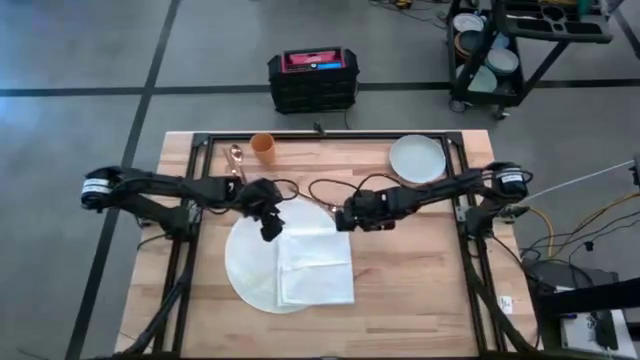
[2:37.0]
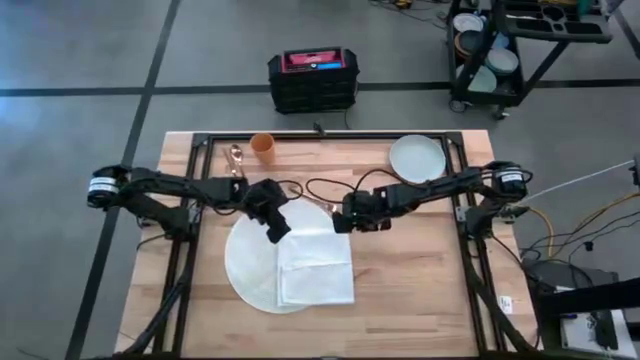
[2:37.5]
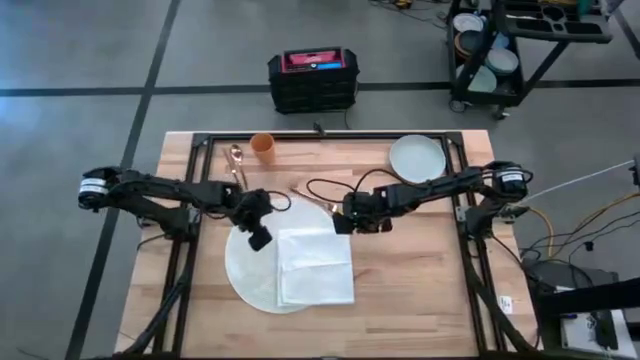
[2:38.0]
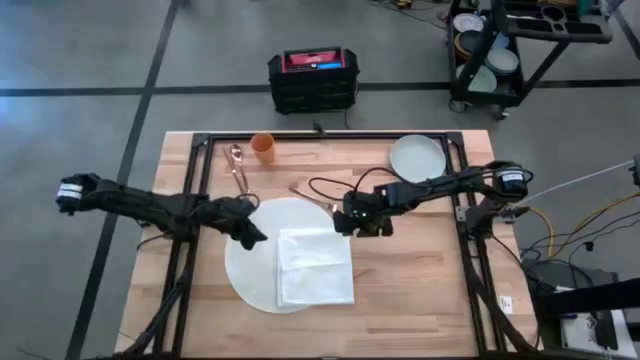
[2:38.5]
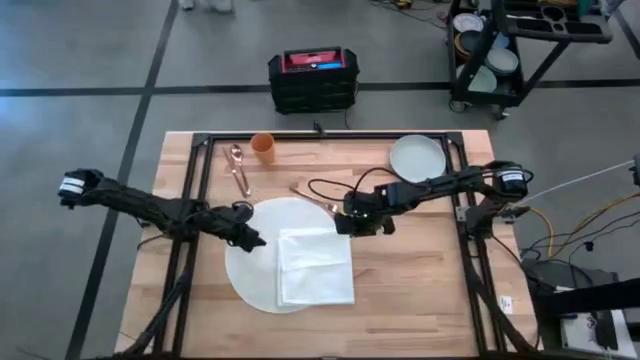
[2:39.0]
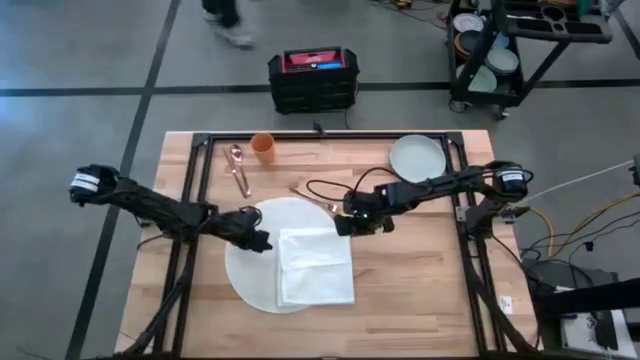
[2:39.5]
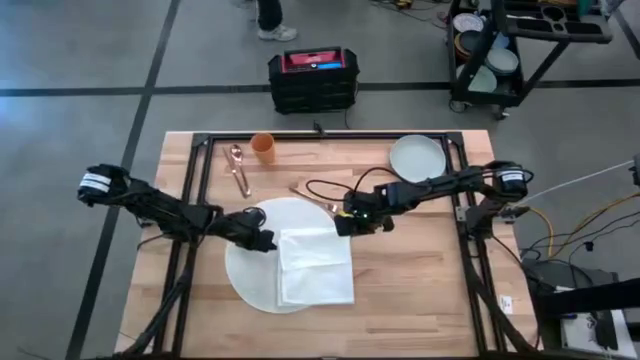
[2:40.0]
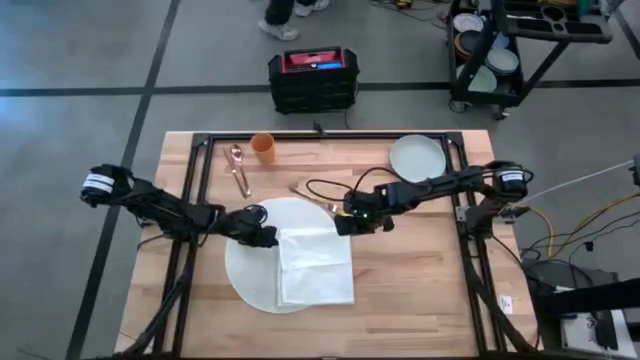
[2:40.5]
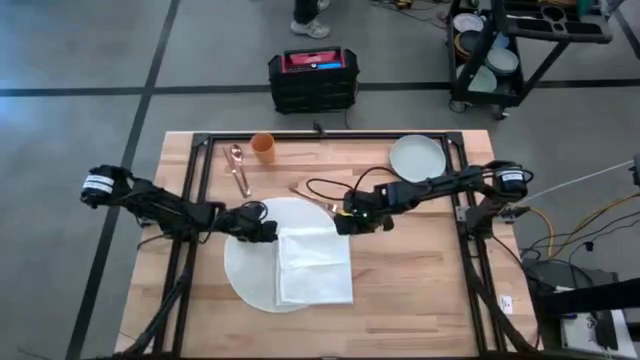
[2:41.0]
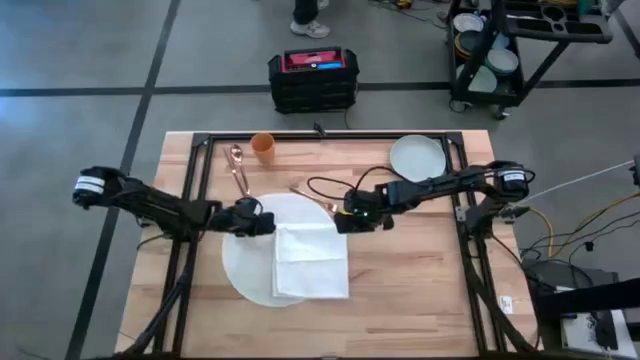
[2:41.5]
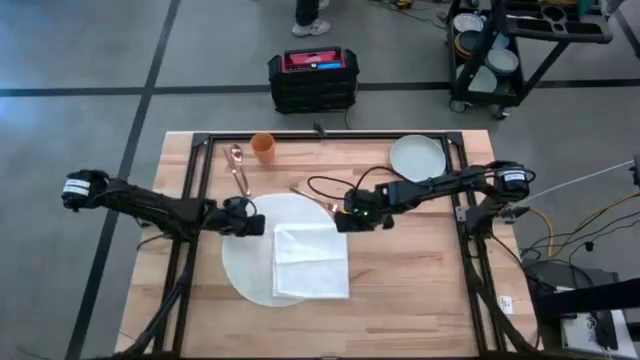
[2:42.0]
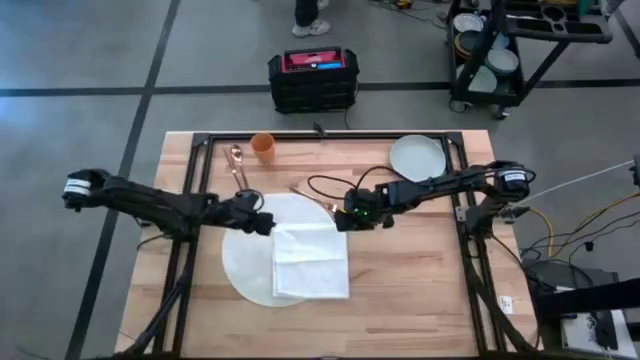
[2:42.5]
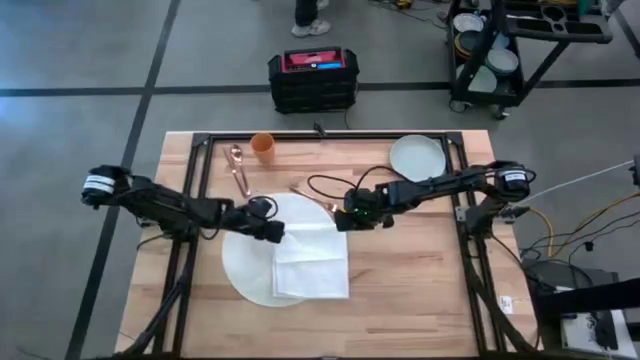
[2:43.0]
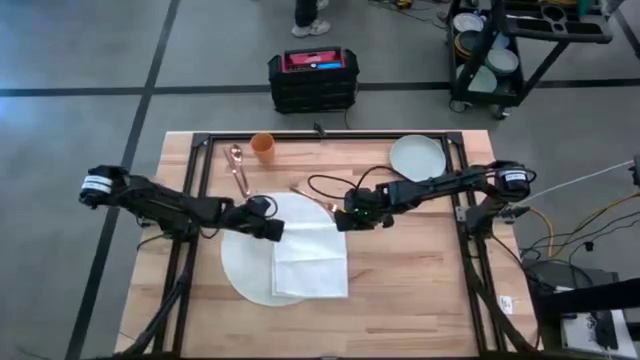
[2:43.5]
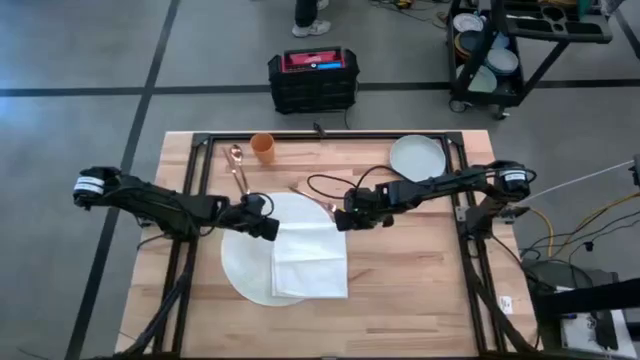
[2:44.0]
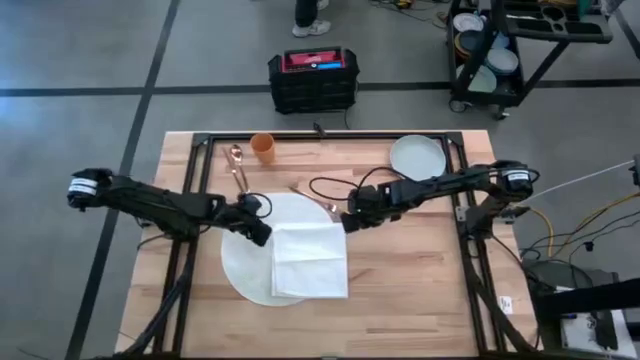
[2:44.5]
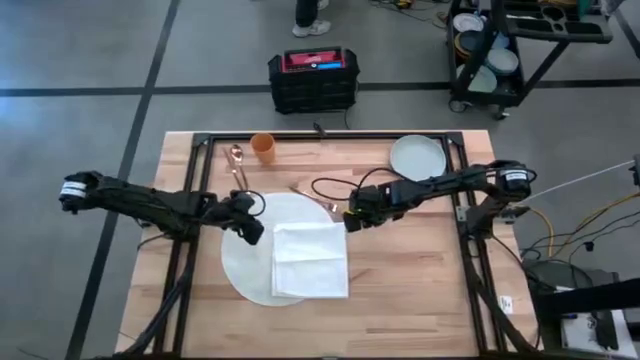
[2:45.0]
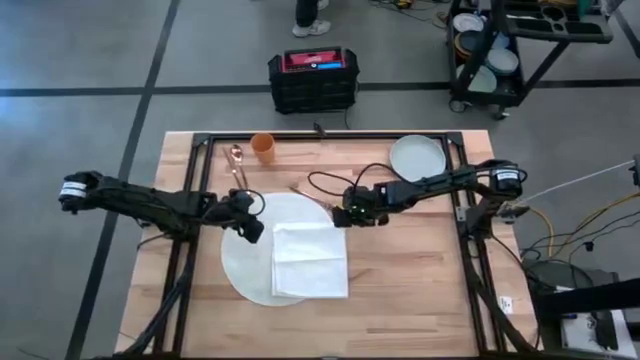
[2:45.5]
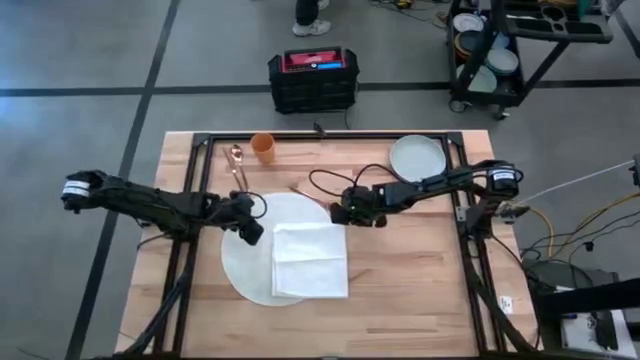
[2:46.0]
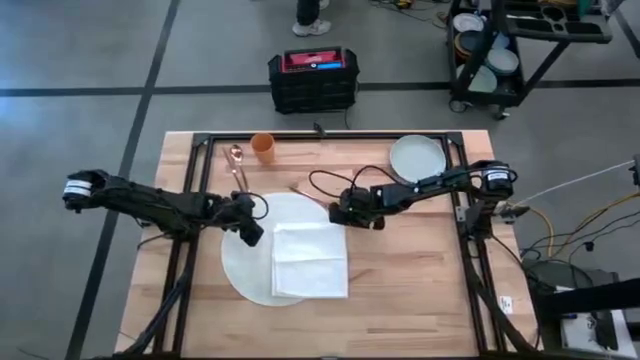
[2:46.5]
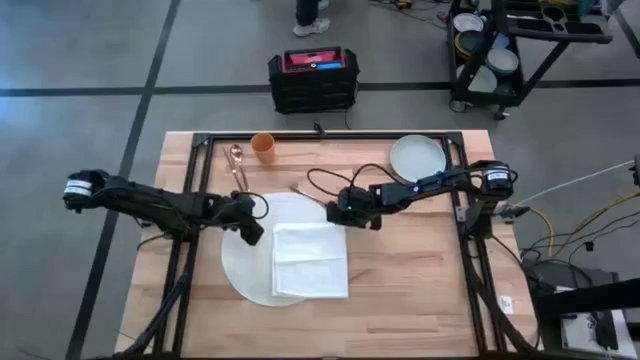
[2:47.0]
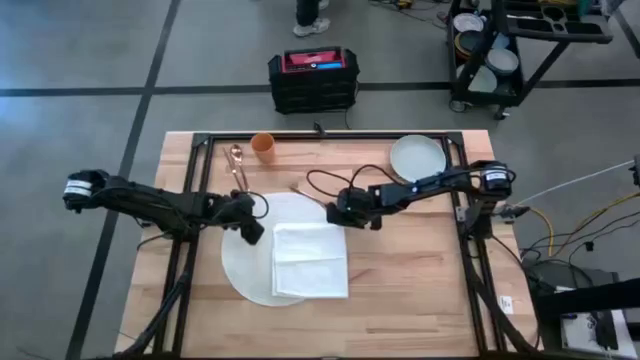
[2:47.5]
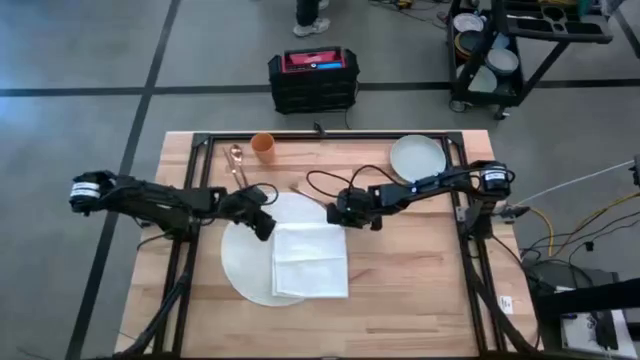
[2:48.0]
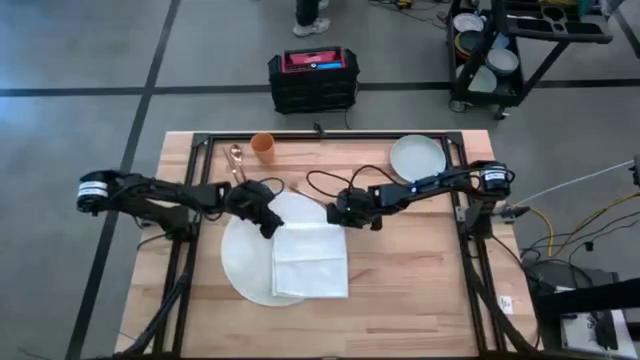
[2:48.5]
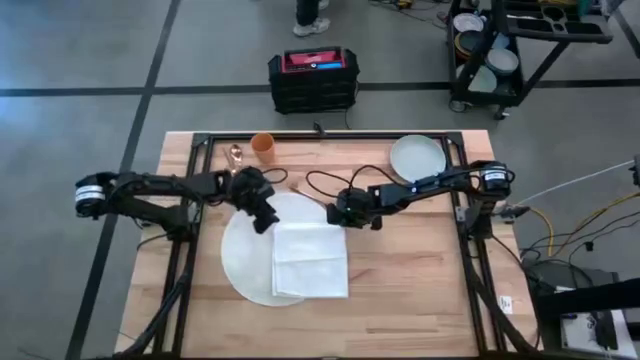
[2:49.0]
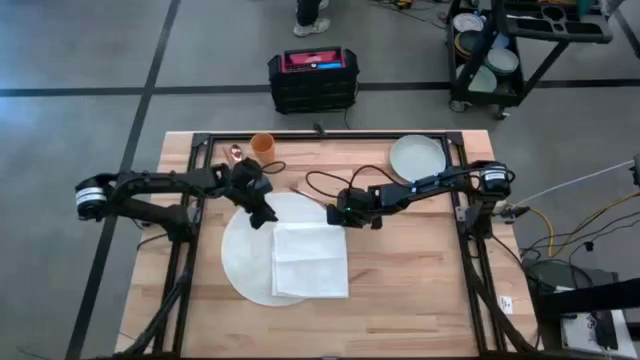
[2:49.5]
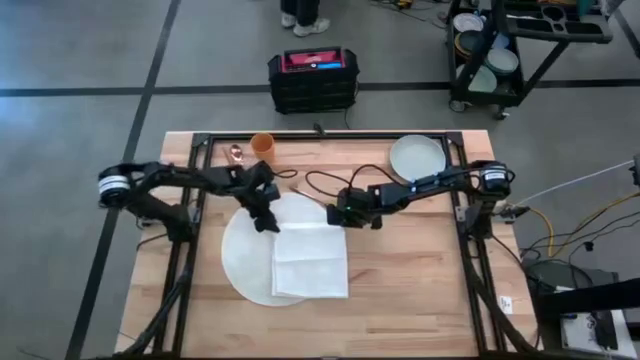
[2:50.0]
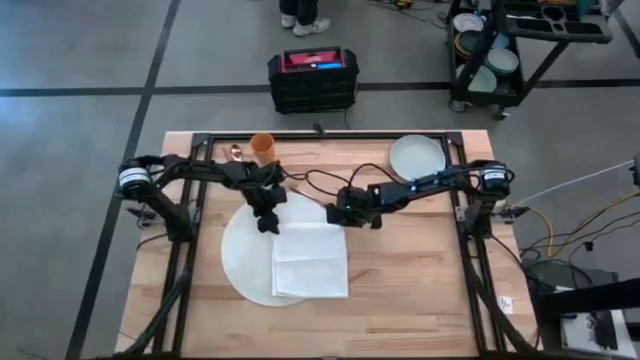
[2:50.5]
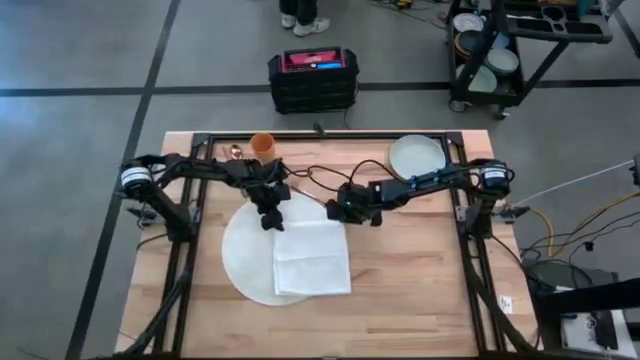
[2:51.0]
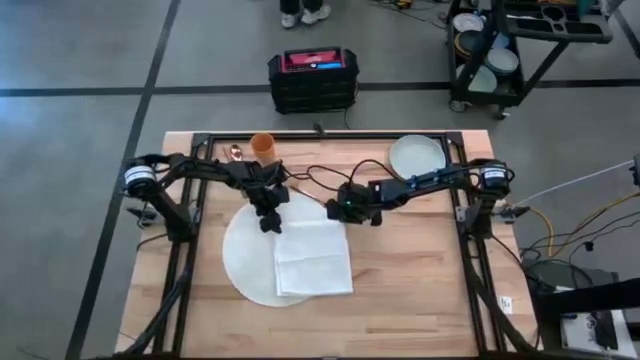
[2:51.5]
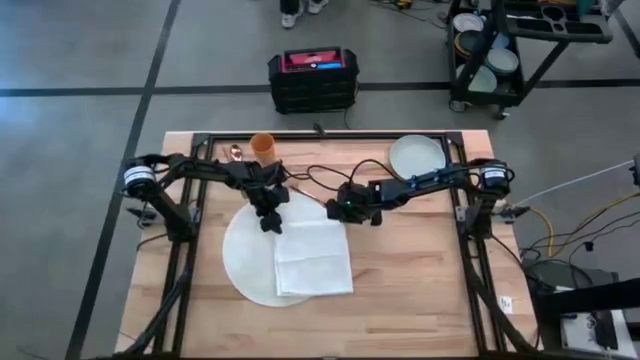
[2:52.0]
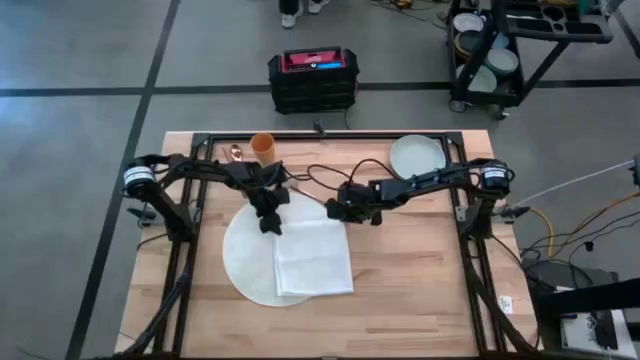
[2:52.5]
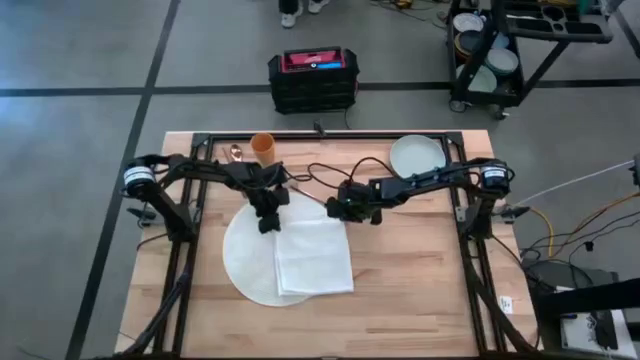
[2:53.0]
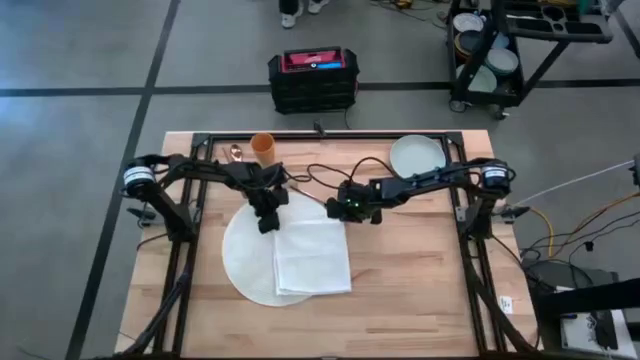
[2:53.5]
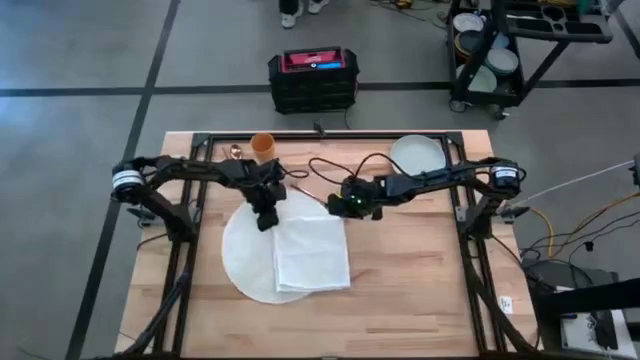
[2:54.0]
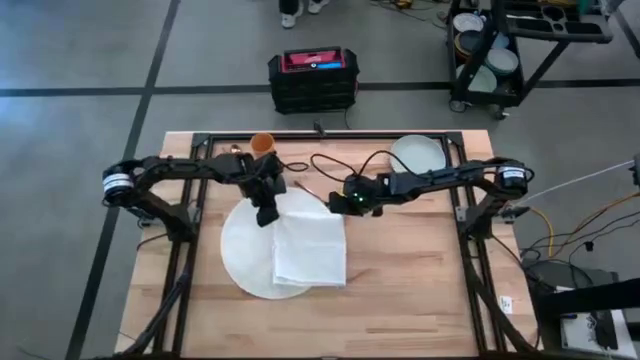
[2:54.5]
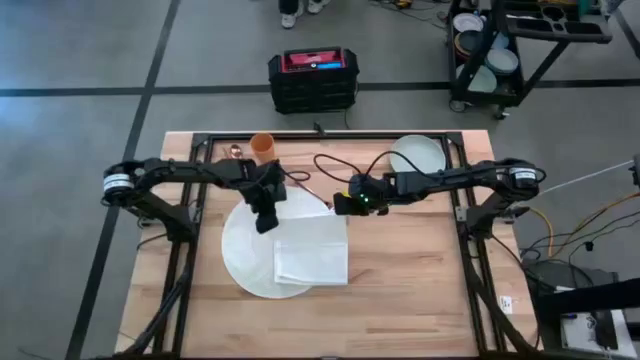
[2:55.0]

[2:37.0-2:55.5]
Task: Set table place
Fold the white napkin

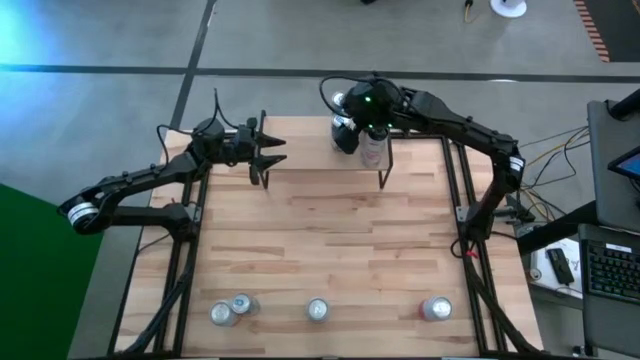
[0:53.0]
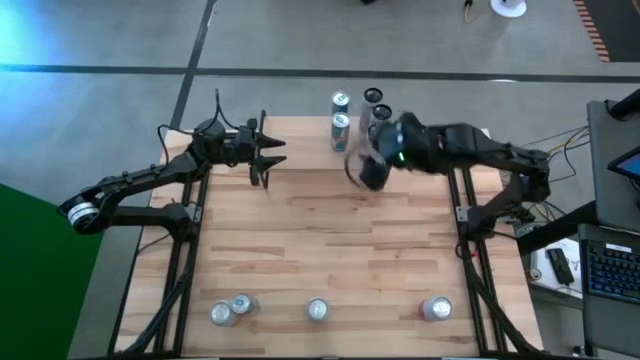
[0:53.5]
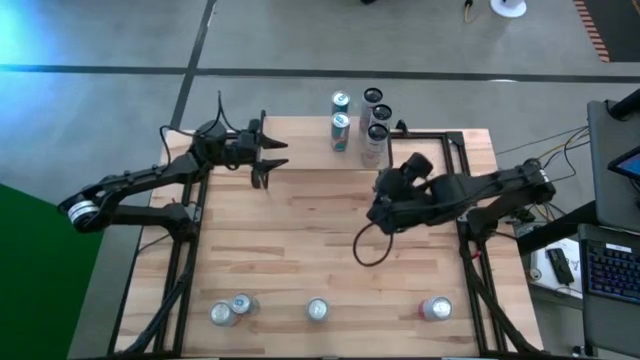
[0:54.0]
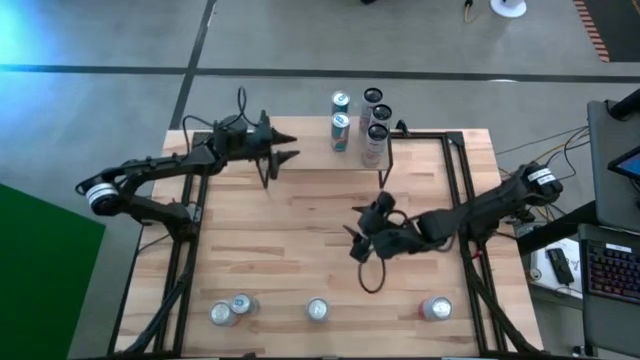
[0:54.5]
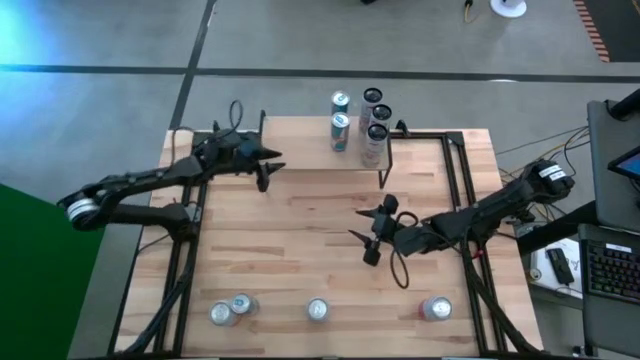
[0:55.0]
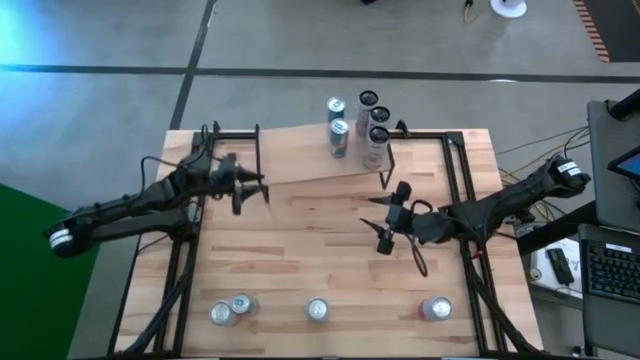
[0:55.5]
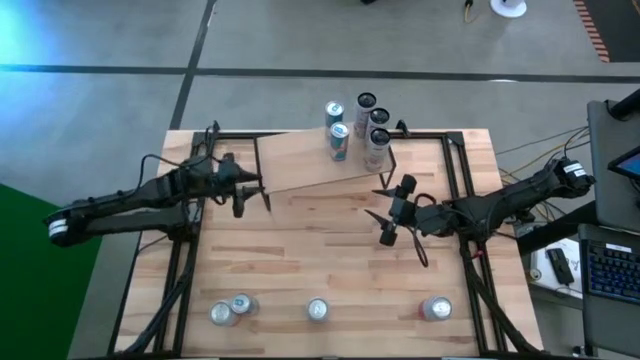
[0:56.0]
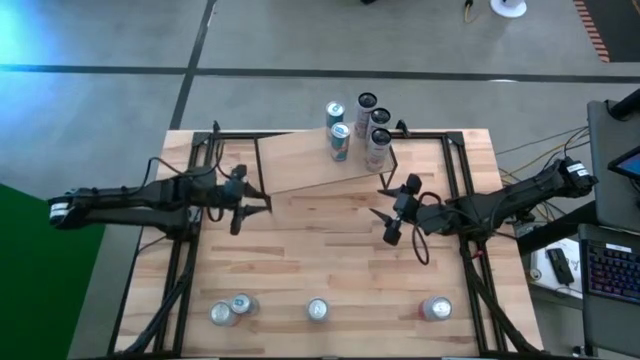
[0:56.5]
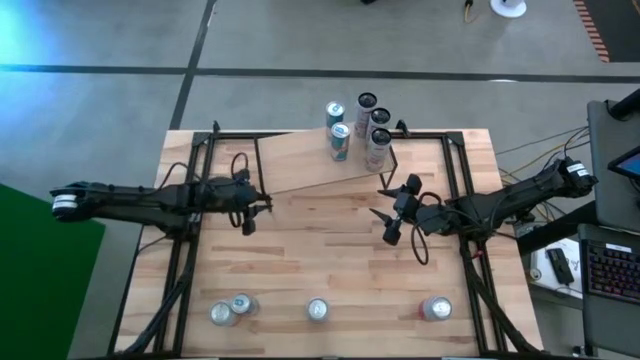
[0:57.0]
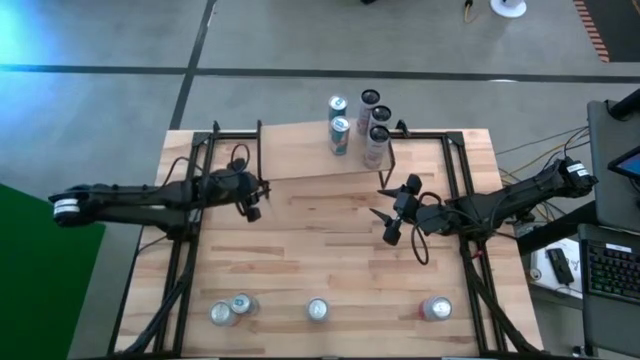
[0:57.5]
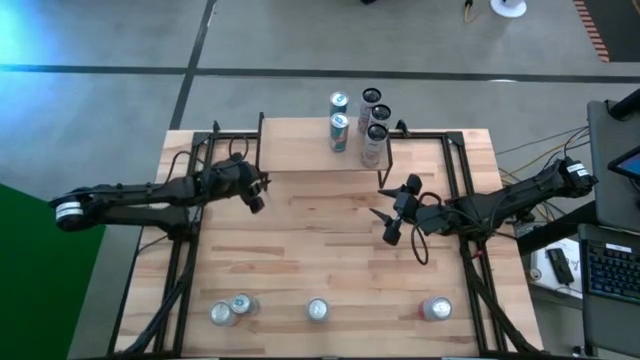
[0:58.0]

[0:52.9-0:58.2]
Task: Place canned beverage on shelf
Adjust the shelf
